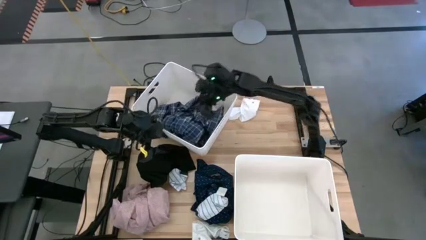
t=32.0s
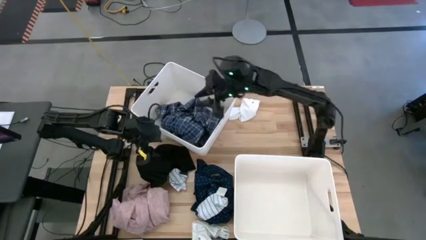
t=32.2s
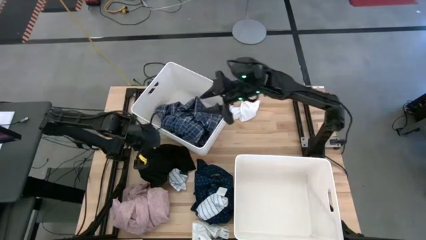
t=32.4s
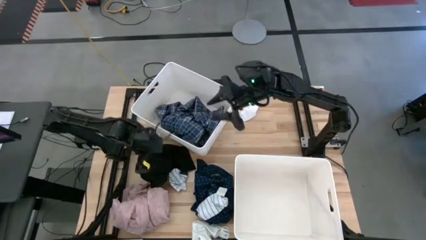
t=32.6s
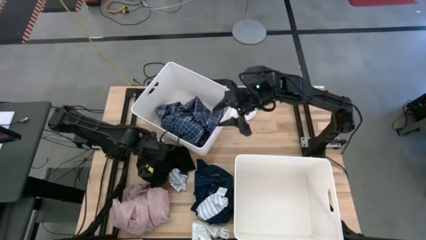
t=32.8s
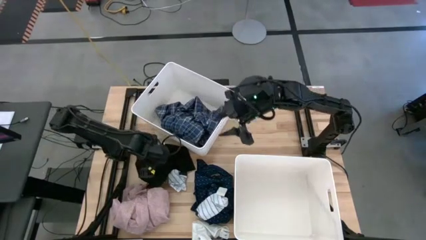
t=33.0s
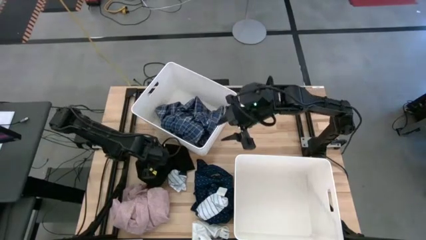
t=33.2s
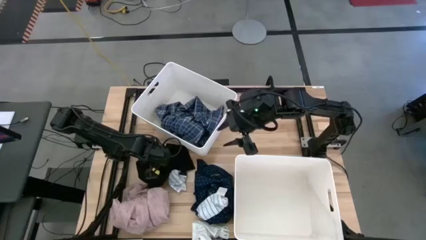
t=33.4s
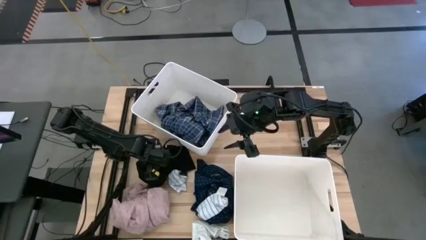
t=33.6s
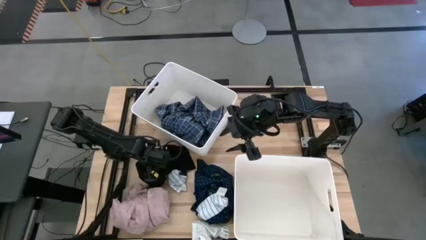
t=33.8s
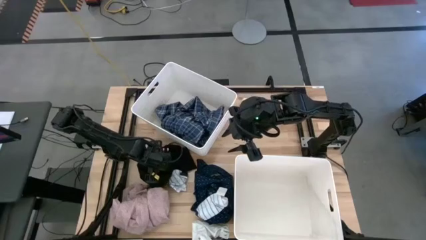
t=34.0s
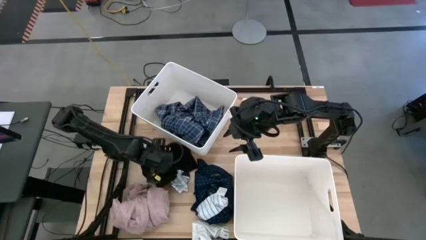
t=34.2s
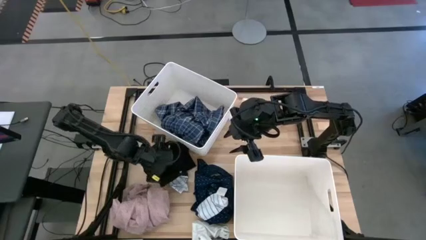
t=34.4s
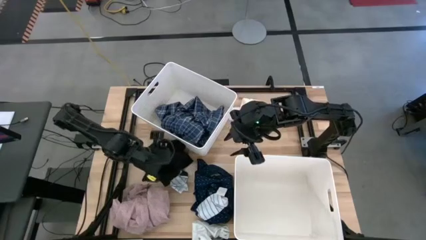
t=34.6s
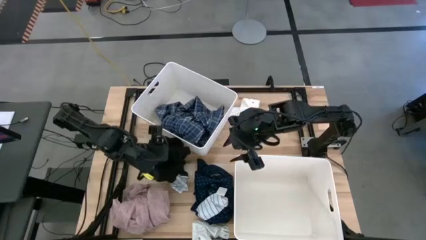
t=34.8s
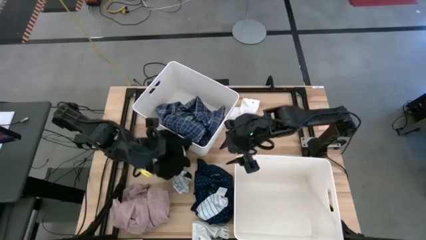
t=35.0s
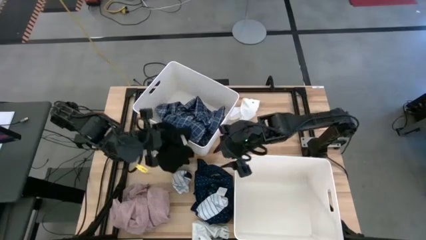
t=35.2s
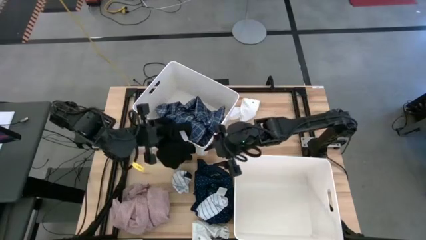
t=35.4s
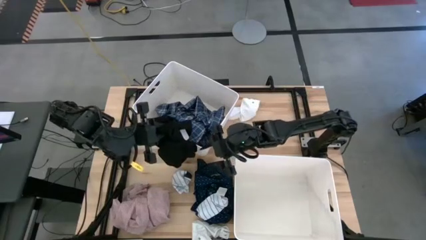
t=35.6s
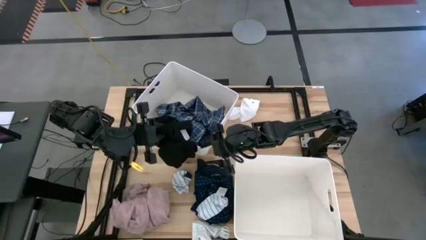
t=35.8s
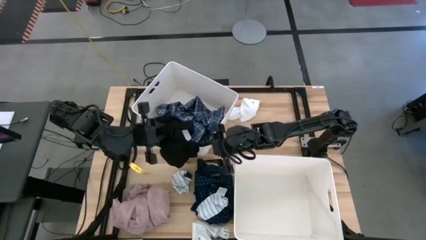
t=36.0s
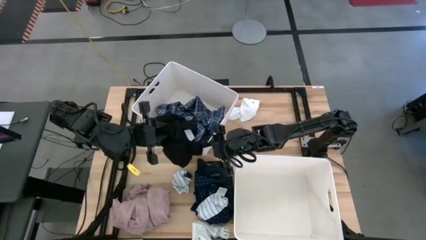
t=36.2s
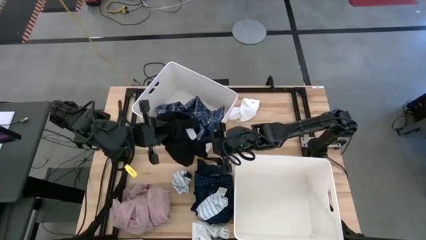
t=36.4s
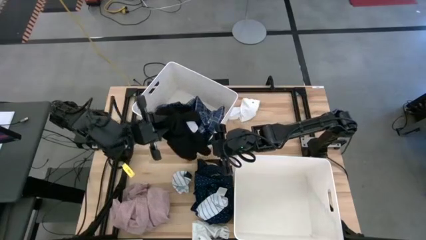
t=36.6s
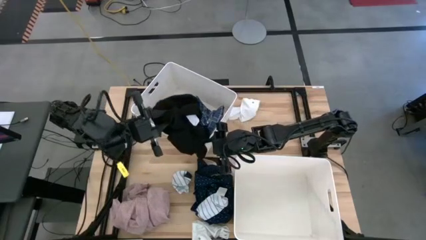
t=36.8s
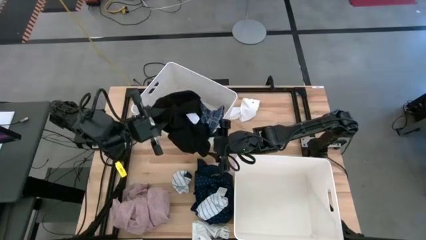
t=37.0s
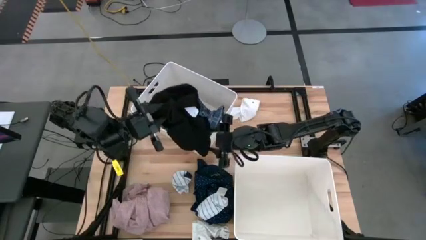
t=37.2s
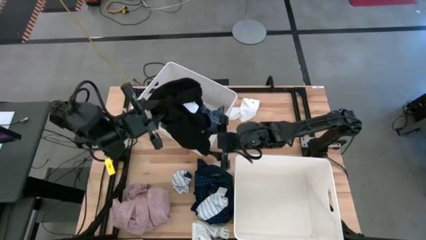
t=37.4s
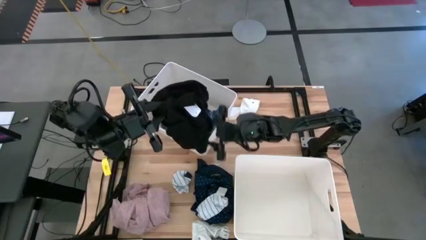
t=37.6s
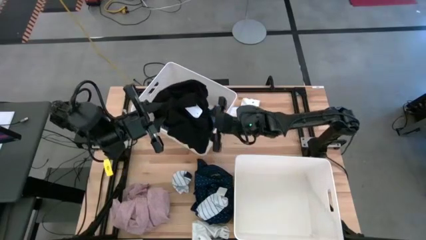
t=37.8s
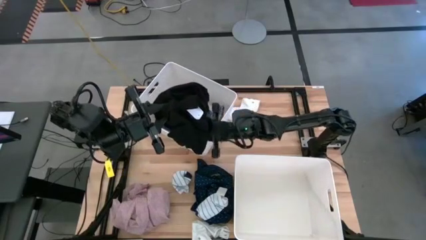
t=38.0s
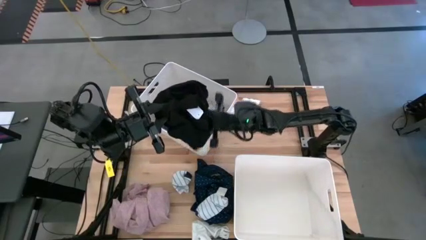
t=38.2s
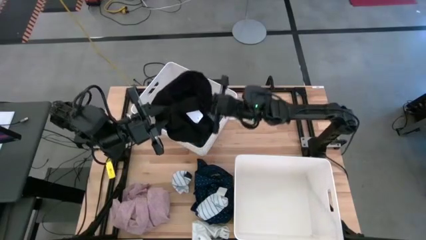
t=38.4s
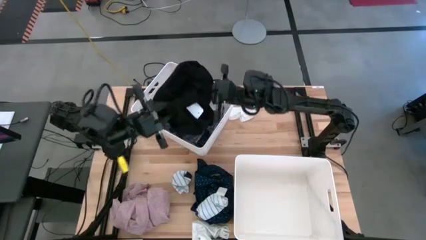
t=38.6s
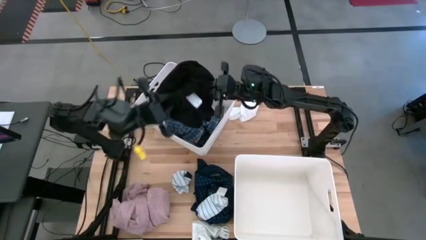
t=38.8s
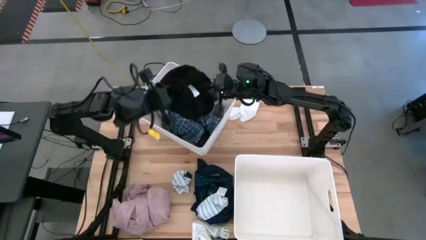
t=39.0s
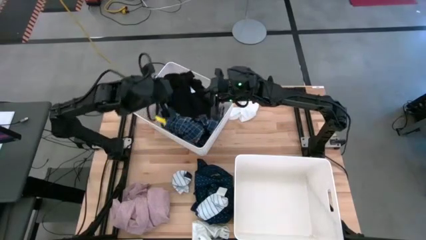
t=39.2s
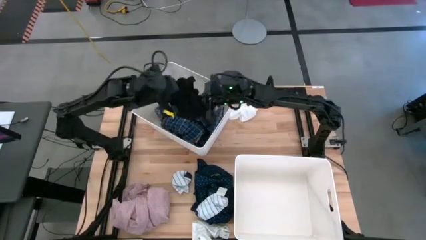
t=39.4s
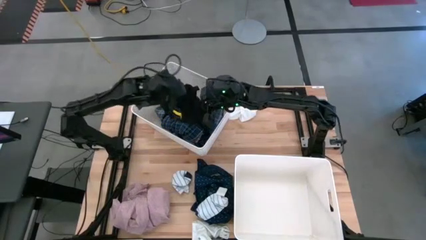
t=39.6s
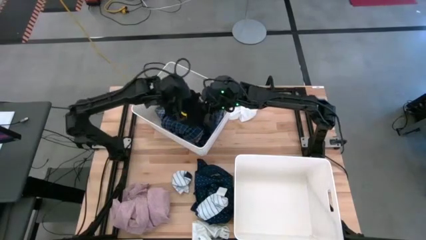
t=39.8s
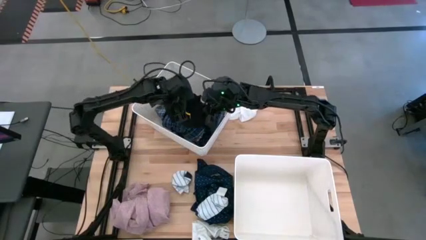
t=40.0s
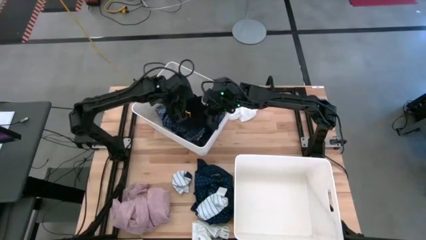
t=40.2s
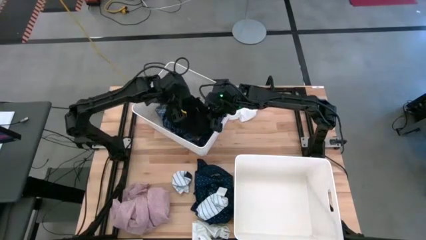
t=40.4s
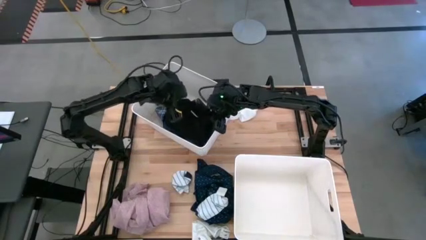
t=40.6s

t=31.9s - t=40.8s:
Task: Sort clothes
Put the black shirt into the top white laundry bin

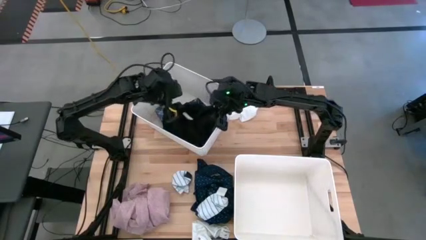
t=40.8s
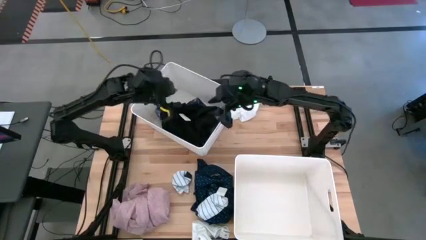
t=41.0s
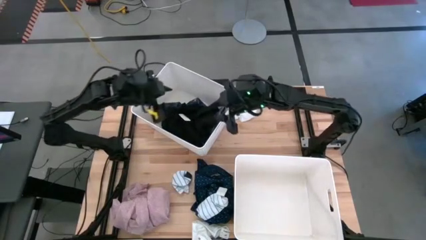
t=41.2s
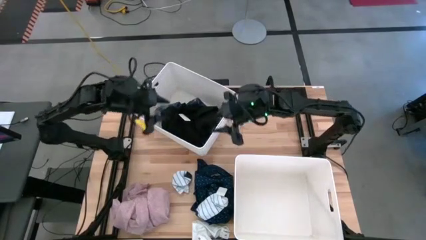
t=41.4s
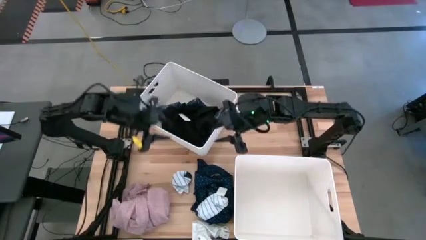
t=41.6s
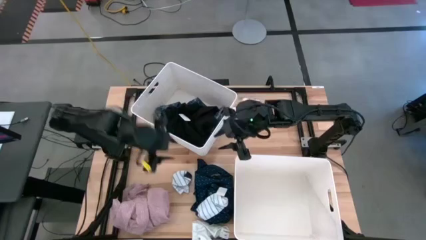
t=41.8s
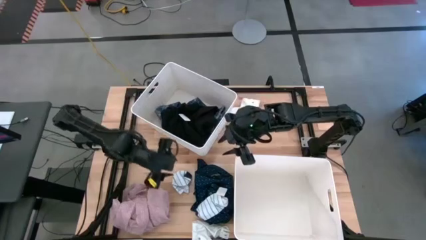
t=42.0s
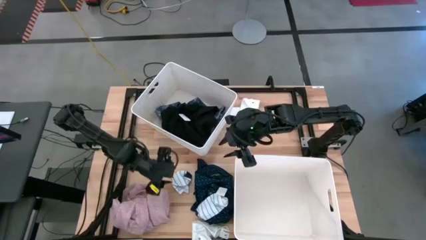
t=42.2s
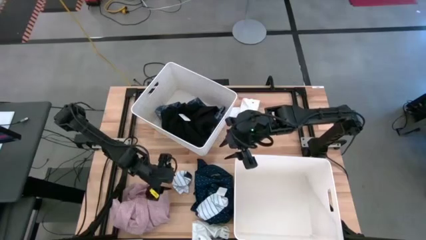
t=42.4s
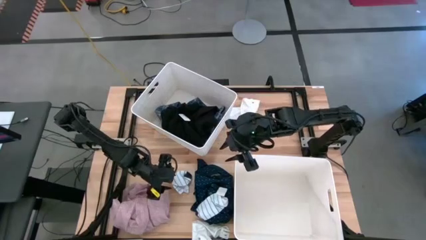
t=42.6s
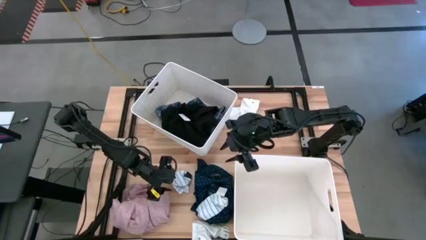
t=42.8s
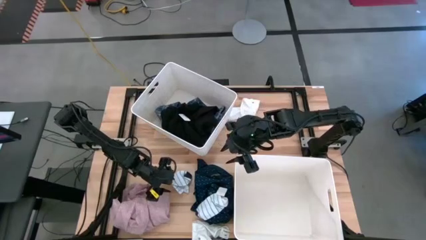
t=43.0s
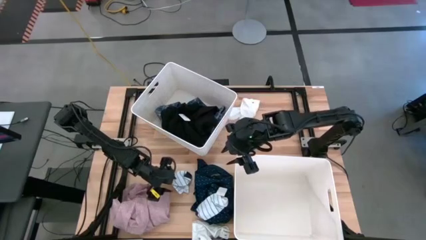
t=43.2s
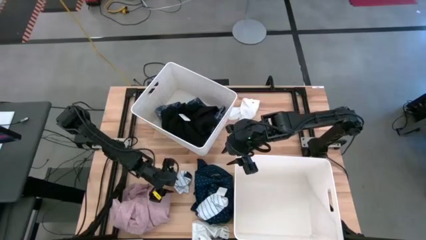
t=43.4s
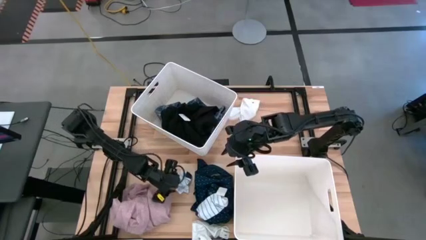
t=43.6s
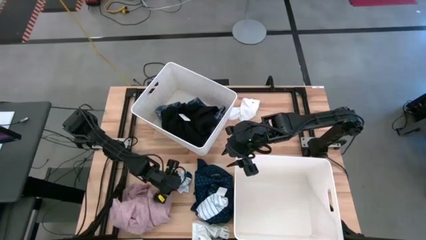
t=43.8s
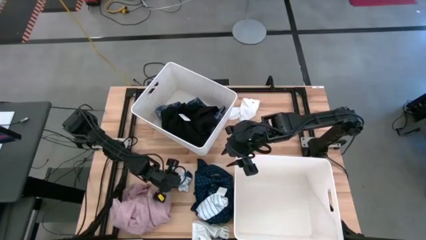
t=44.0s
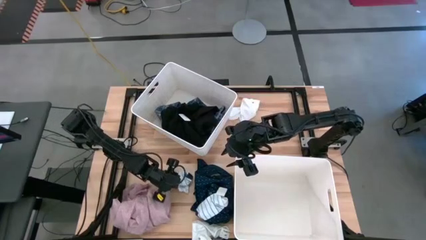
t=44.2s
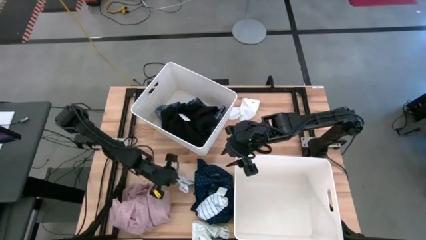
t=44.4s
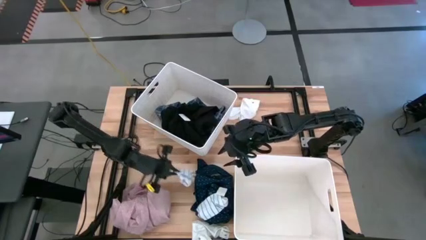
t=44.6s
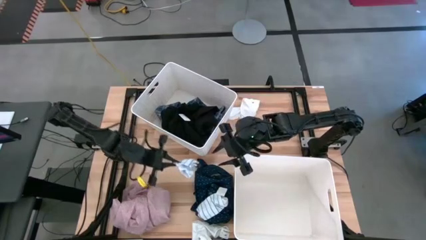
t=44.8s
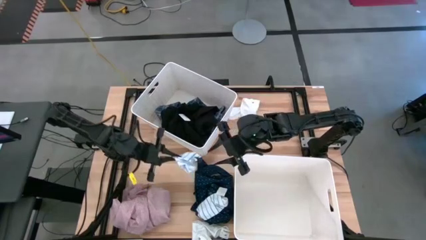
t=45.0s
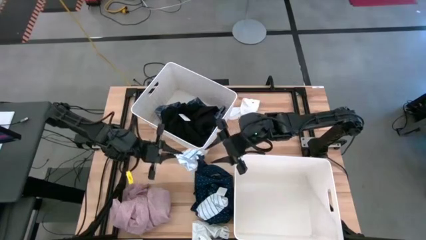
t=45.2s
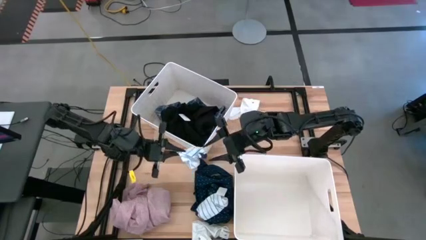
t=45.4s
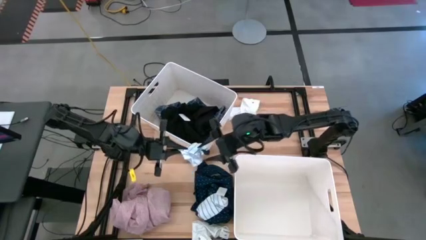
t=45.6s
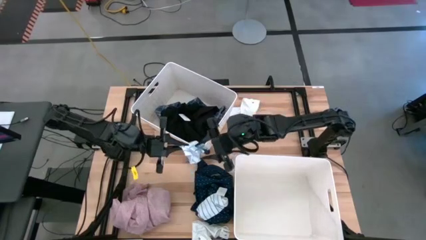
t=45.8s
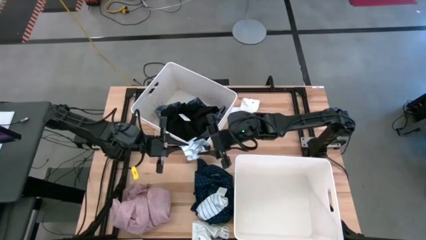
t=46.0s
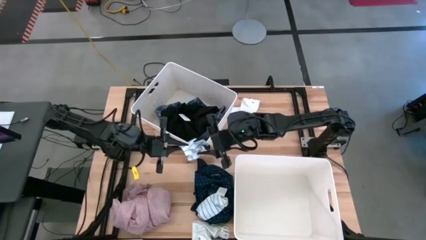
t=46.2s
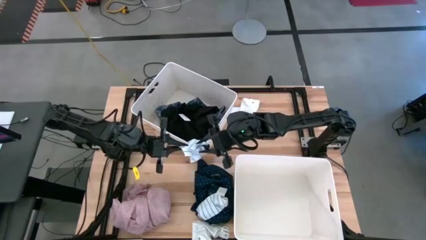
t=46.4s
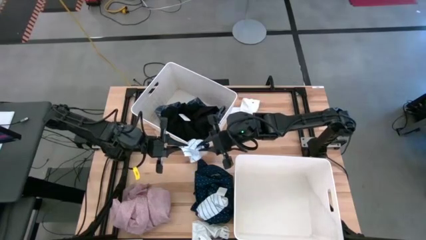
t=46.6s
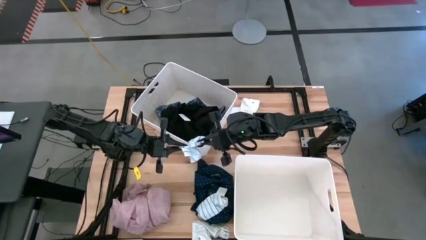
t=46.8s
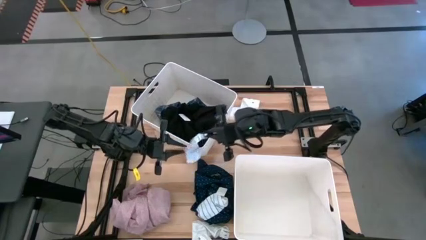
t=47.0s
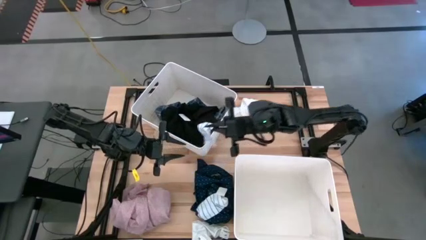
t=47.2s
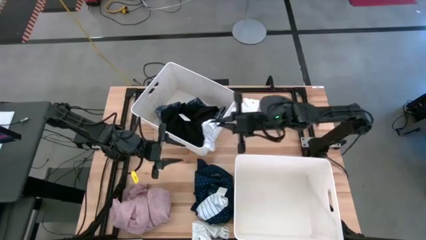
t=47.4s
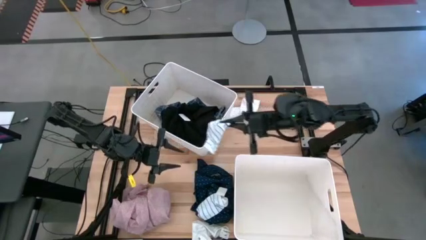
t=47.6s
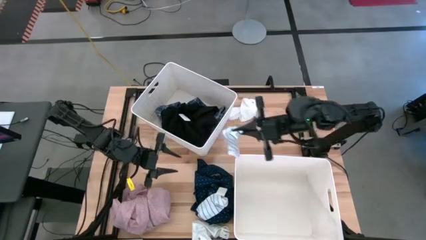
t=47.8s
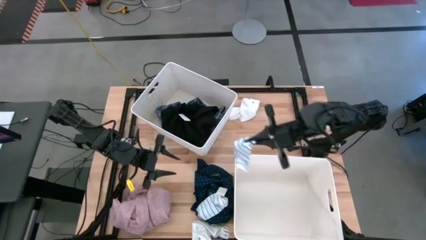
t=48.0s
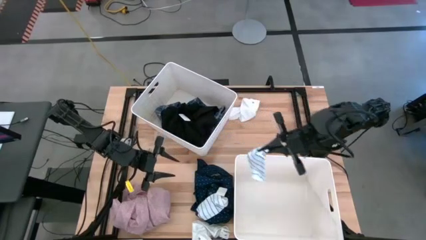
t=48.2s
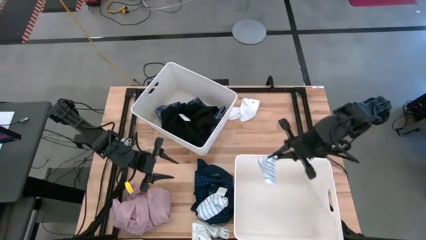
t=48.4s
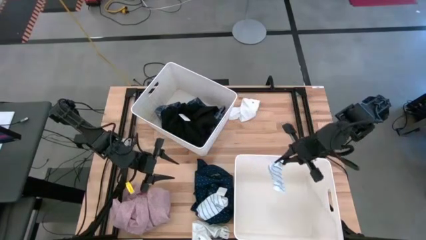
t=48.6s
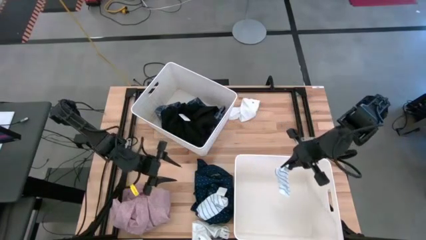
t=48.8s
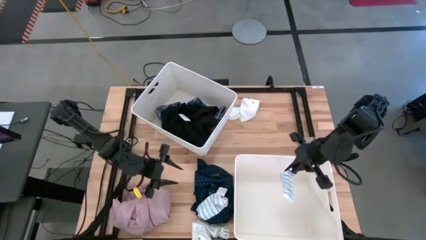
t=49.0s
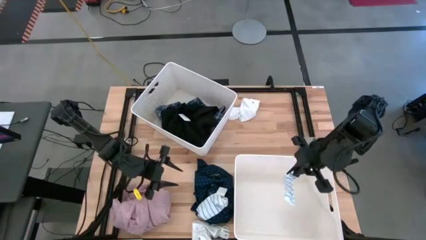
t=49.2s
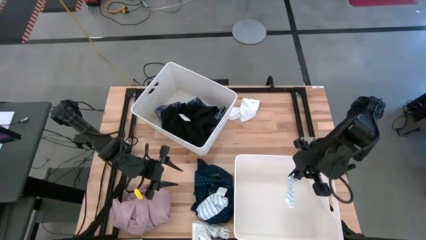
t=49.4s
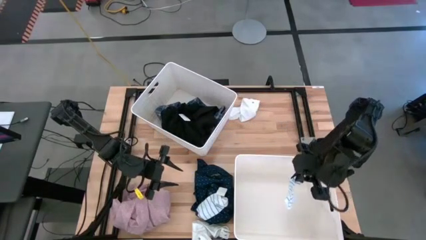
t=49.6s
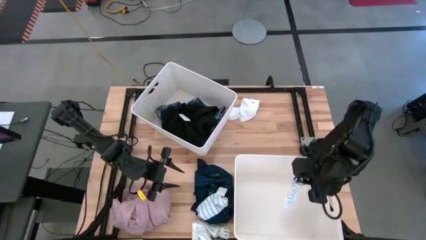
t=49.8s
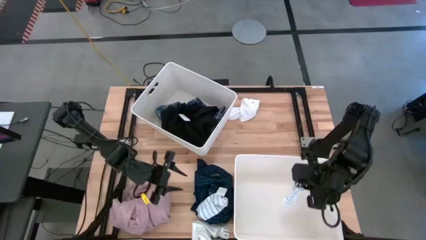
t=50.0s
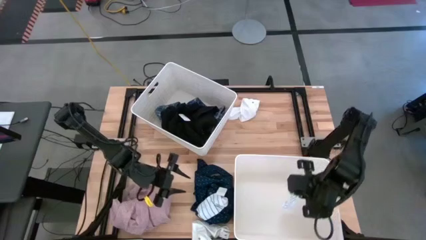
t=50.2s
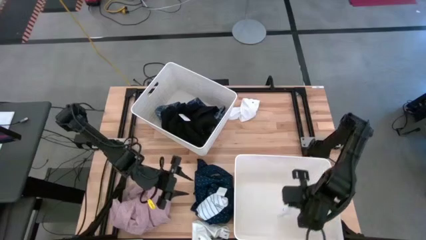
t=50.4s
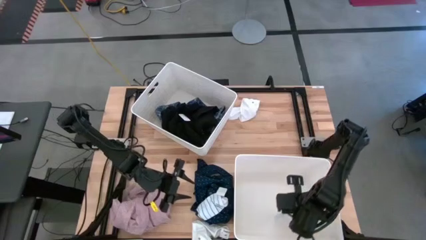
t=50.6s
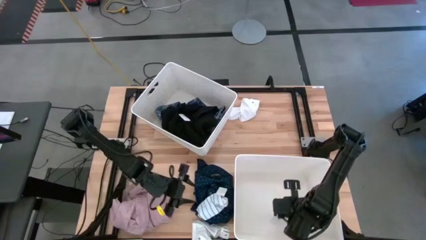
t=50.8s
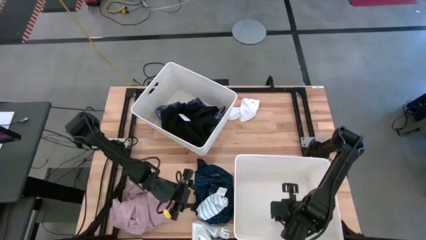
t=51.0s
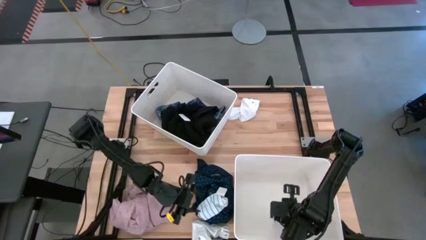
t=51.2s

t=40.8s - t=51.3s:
Put the left white striped sock into the bottom white laundry bin
